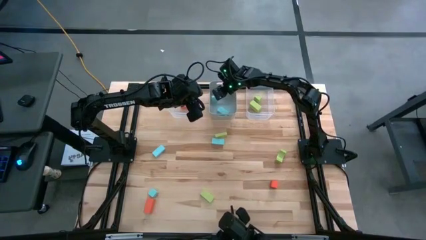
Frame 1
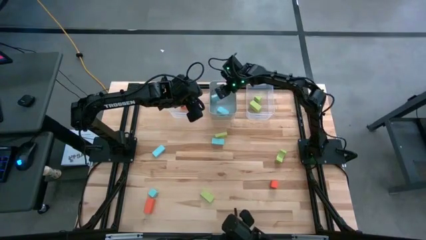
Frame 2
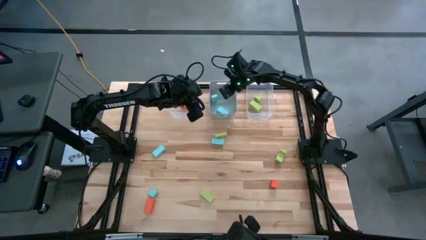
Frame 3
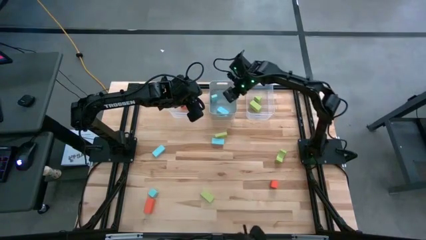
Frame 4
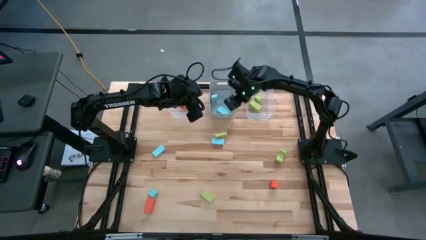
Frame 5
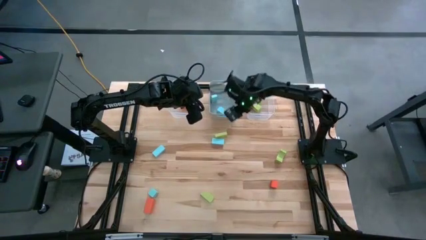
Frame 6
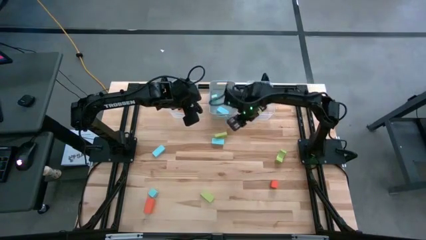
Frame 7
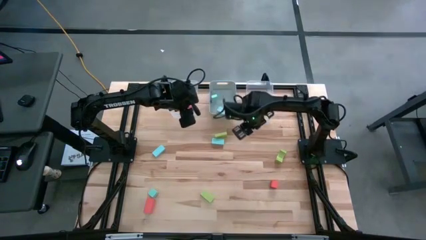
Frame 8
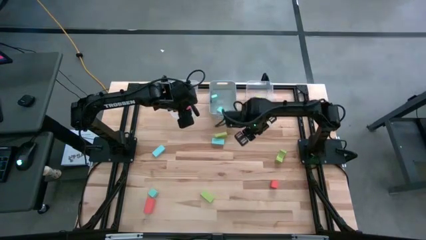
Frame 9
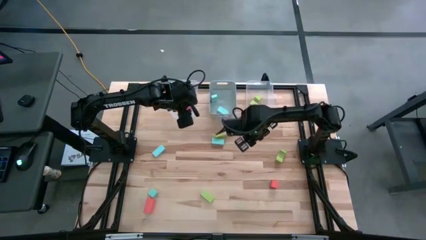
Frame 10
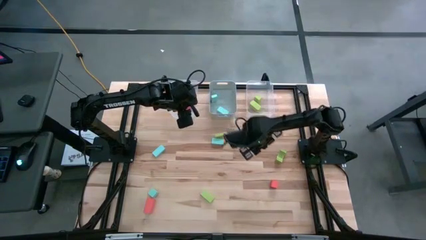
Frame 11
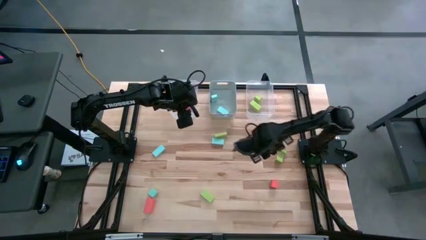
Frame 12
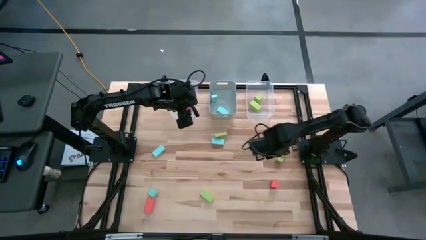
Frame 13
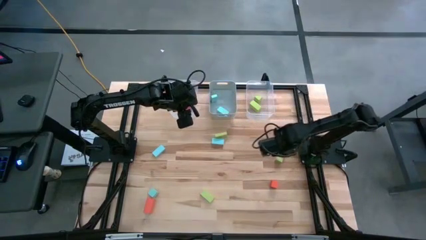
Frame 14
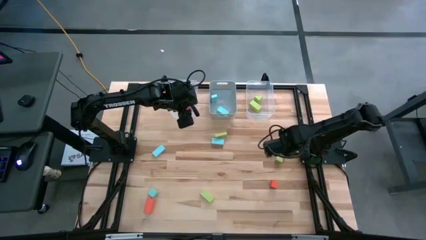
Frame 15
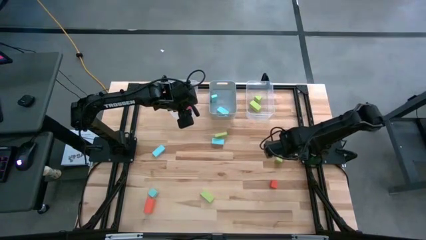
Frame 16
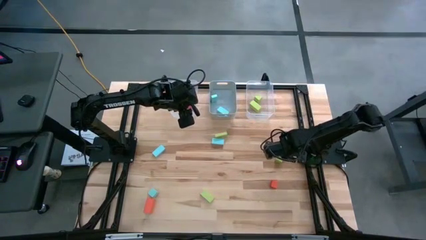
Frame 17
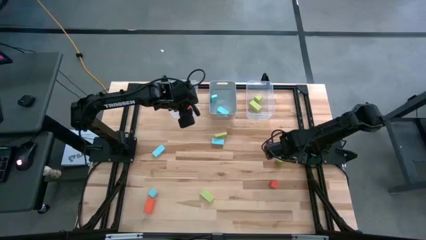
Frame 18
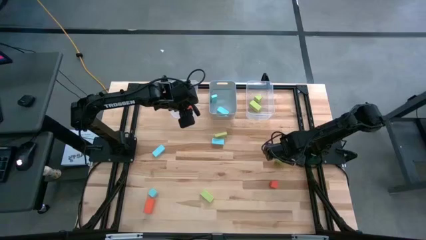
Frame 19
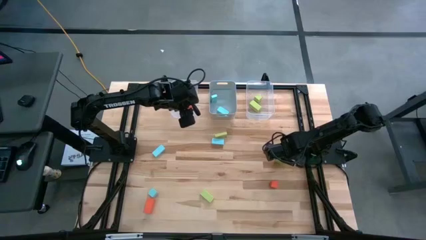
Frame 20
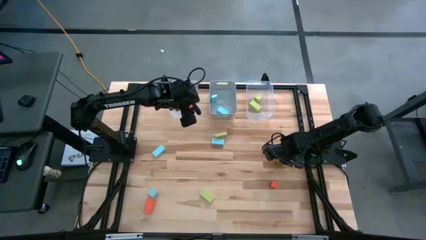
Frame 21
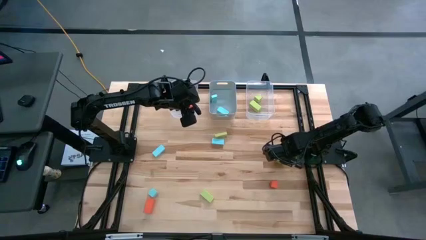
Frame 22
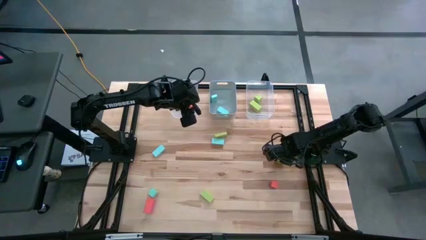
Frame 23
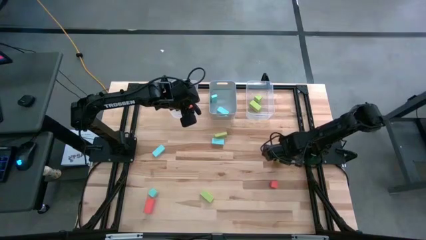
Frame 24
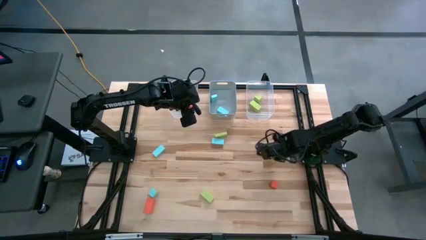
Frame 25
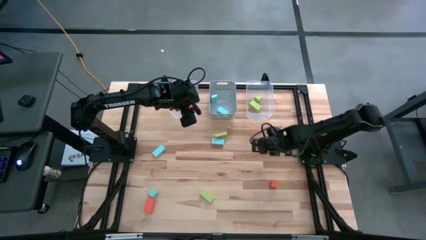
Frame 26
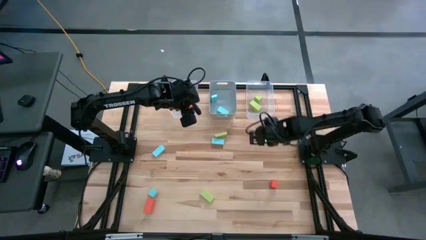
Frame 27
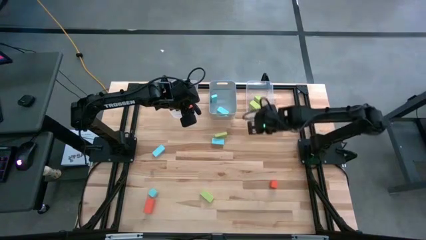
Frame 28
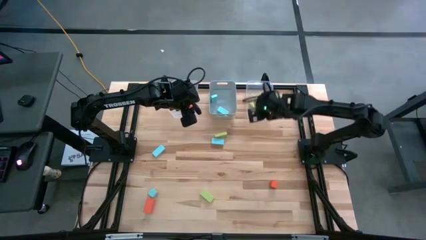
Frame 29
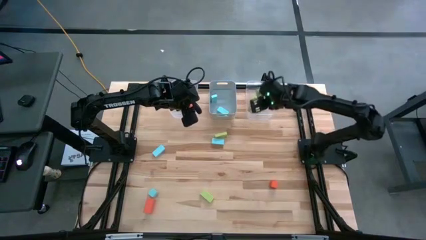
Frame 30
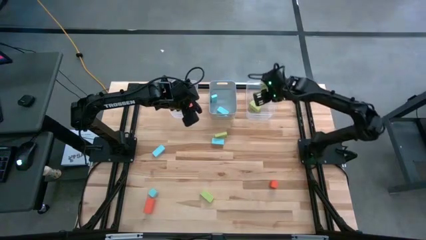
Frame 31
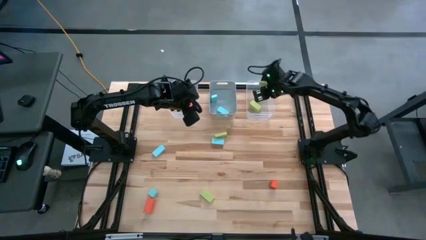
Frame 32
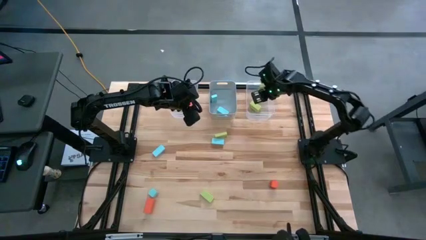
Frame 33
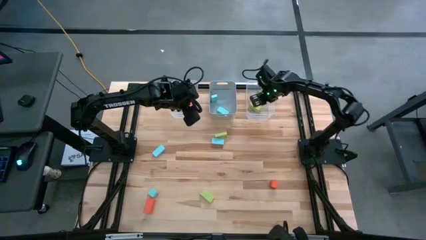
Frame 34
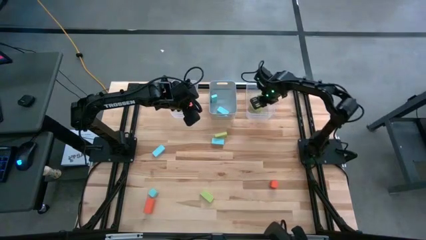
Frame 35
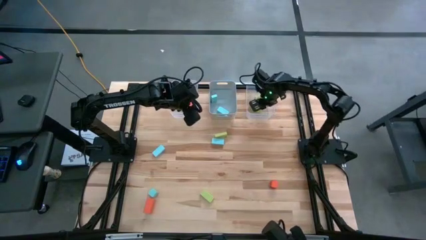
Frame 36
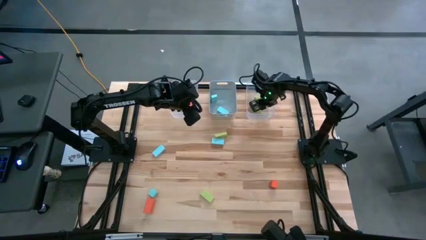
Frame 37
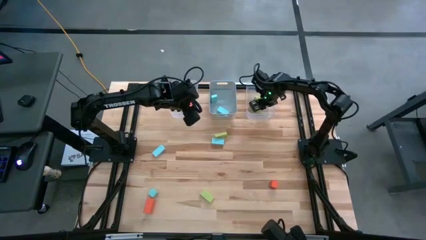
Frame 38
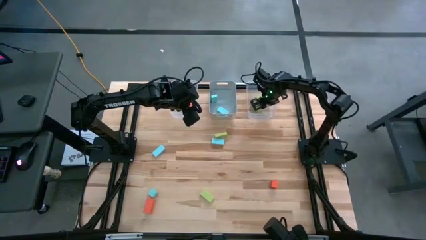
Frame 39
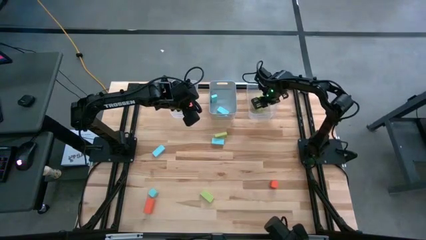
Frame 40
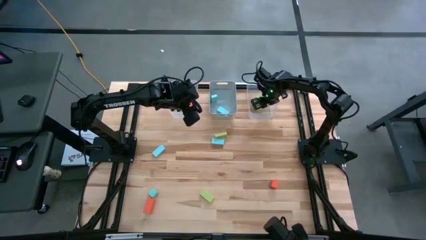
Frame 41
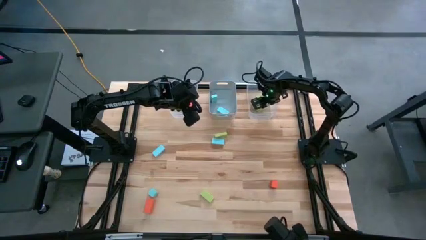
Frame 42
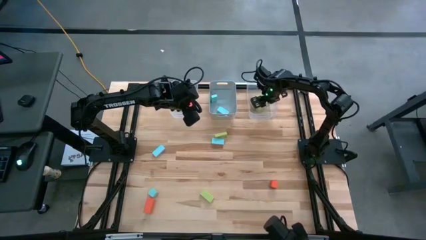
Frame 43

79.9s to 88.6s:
Task: Sort & place blocks by color
Put the green block into the right transparent bin

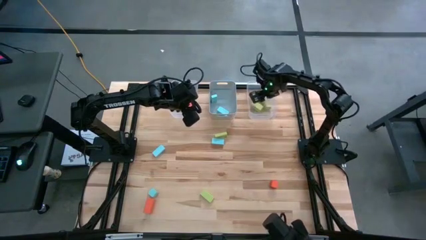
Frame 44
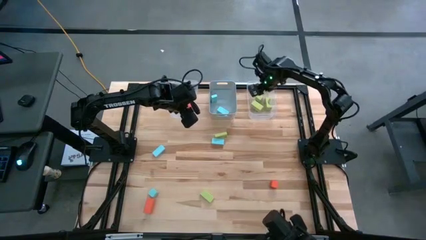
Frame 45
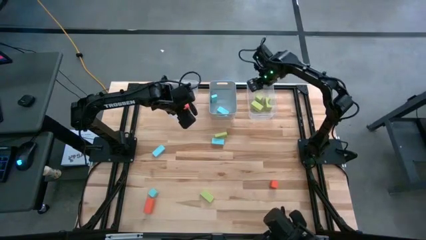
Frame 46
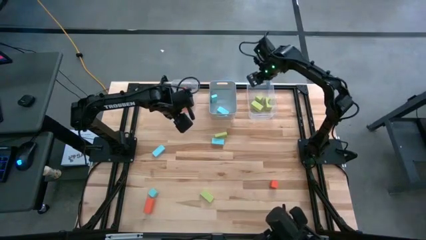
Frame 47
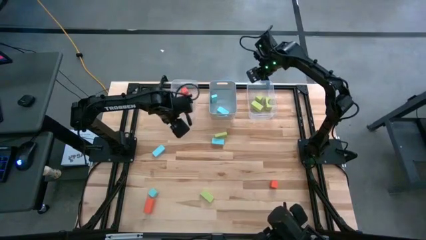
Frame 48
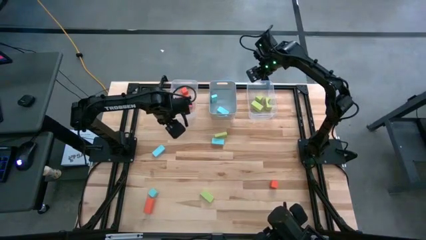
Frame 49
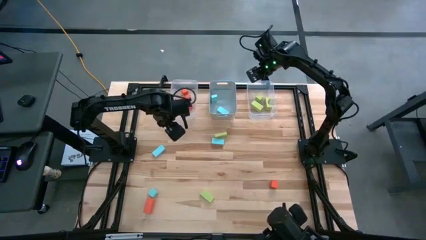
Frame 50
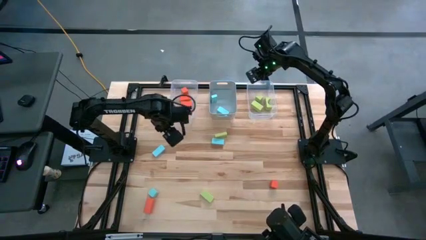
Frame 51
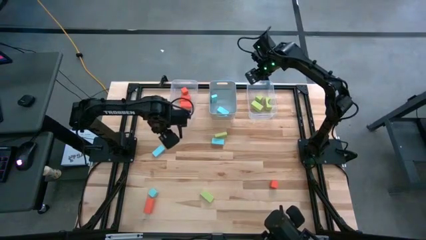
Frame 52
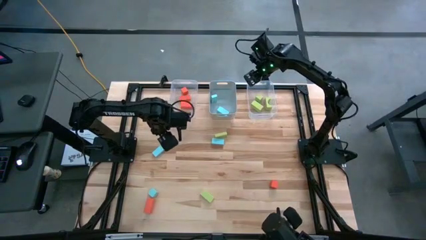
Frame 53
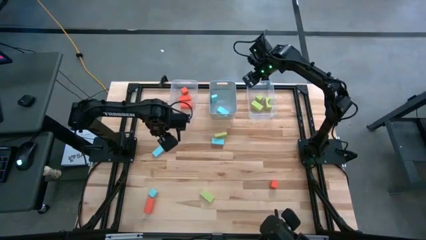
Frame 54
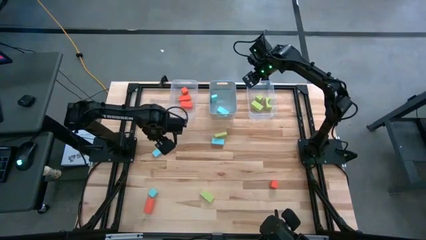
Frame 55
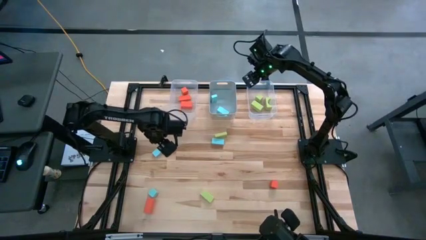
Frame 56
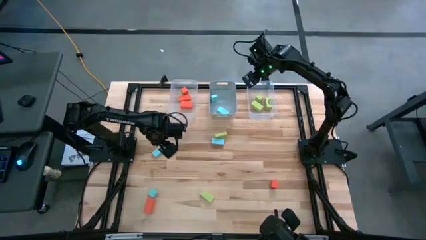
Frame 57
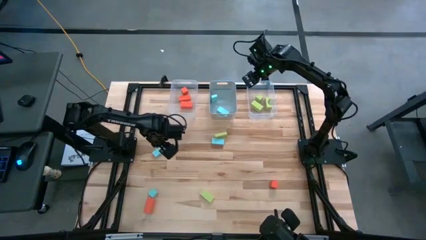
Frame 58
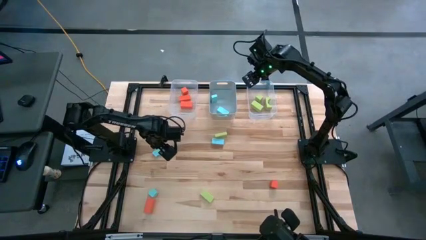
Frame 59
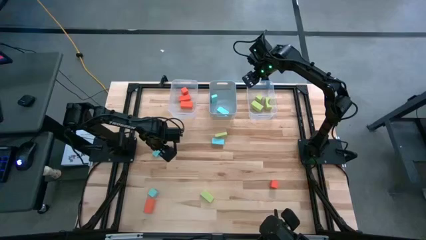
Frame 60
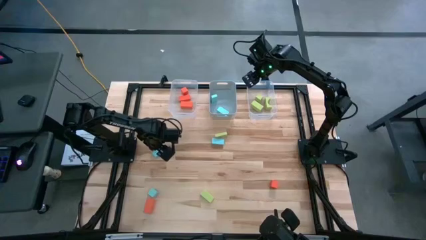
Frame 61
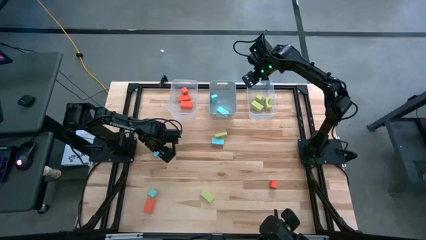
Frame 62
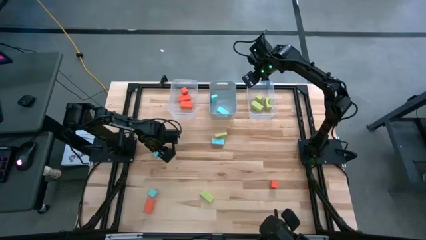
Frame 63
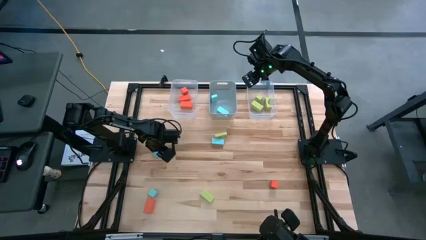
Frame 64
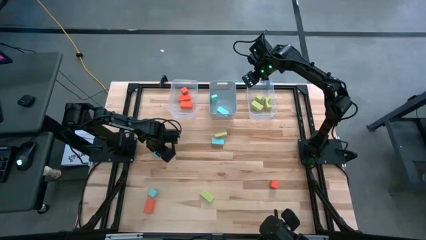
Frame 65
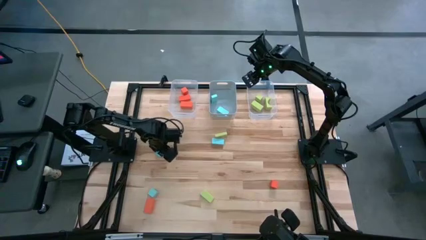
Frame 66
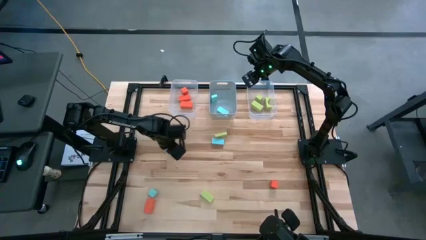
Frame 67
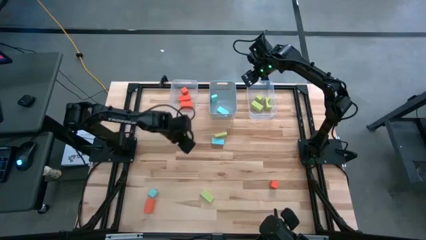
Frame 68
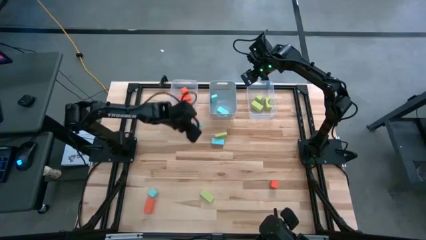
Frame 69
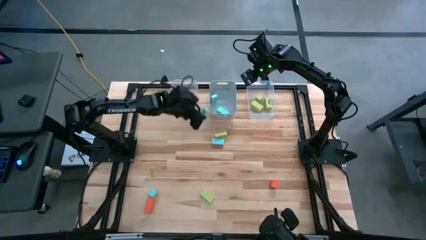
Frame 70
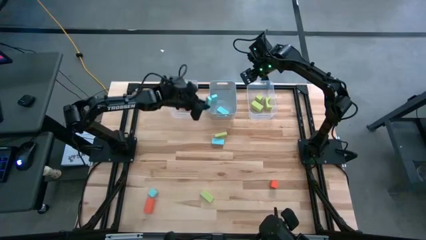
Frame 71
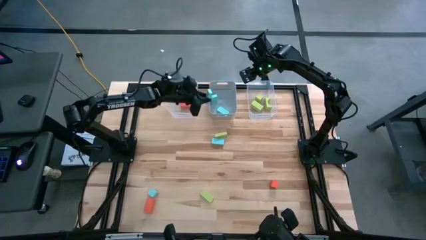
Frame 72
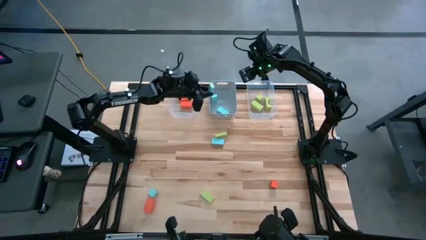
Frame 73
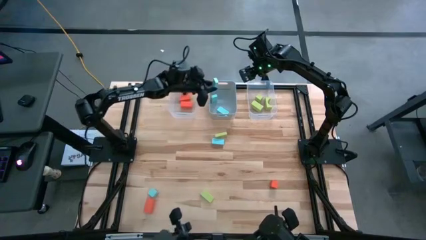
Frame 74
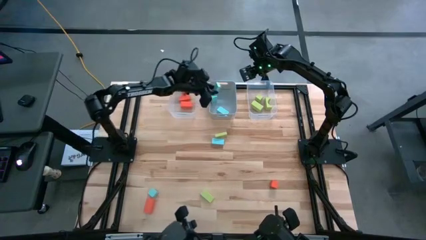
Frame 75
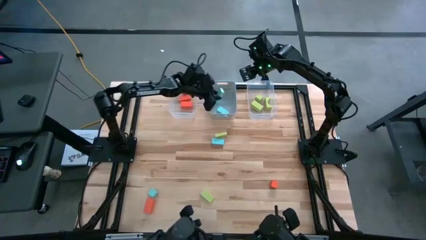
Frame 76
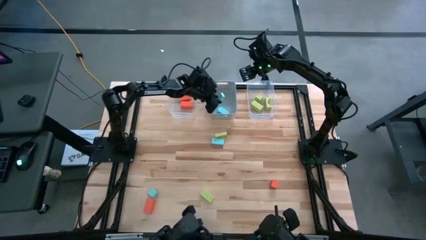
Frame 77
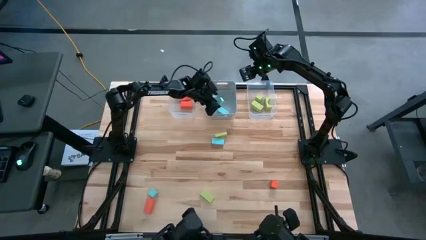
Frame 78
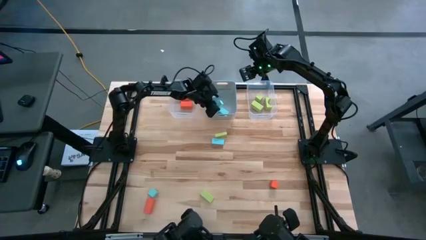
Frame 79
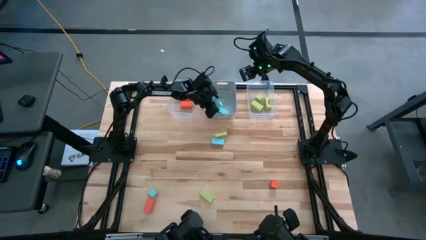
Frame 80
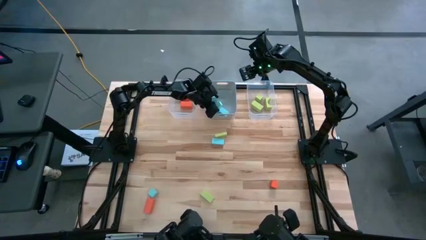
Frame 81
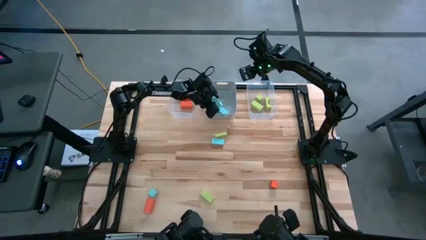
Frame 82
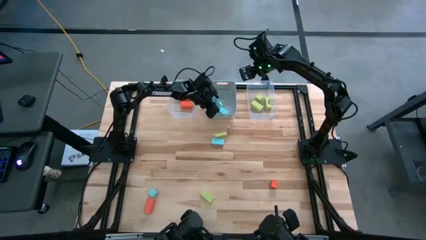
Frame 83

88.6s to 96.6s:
Put the blue block into the grey bin
